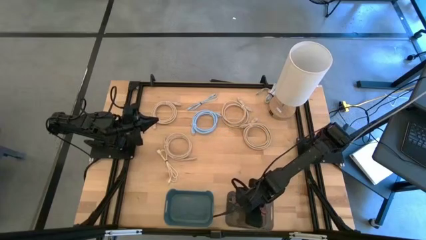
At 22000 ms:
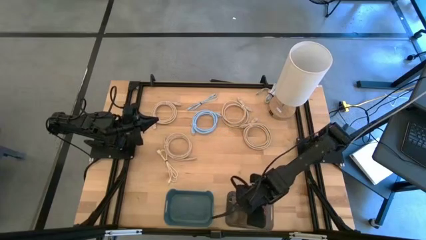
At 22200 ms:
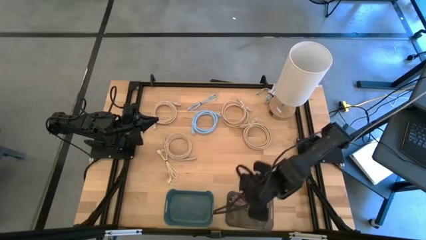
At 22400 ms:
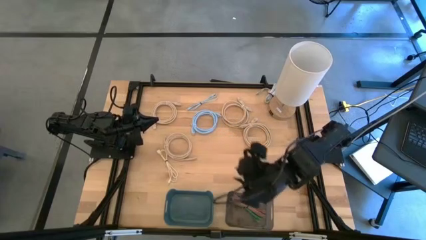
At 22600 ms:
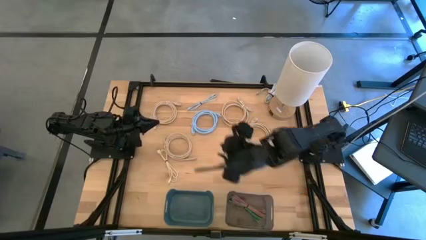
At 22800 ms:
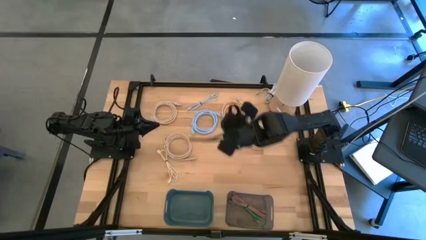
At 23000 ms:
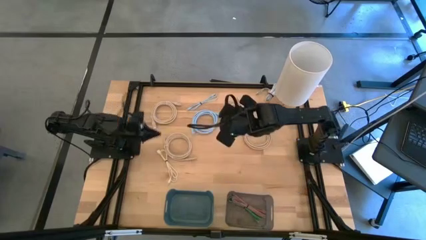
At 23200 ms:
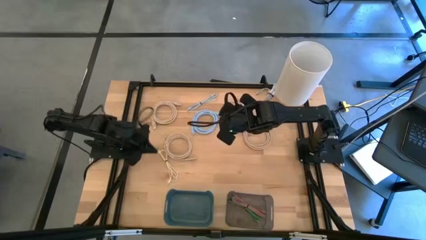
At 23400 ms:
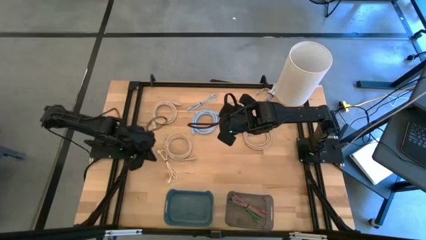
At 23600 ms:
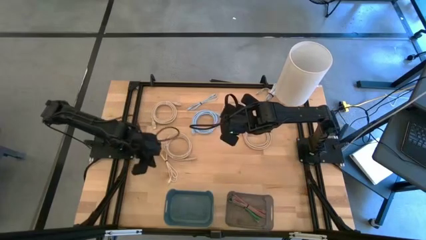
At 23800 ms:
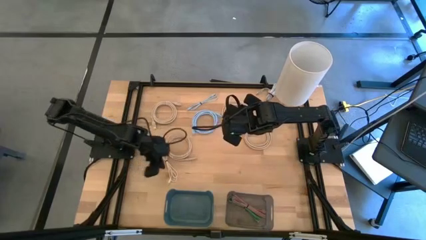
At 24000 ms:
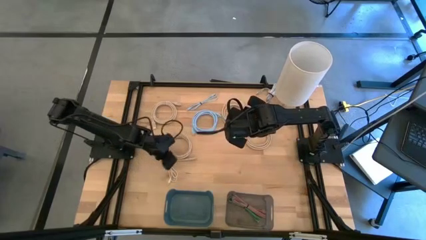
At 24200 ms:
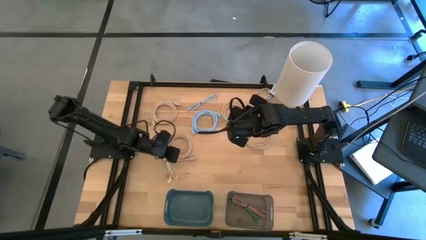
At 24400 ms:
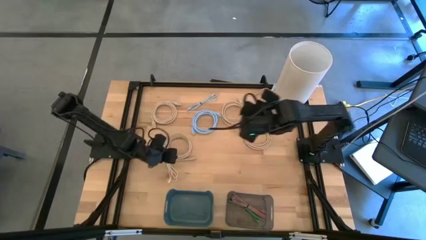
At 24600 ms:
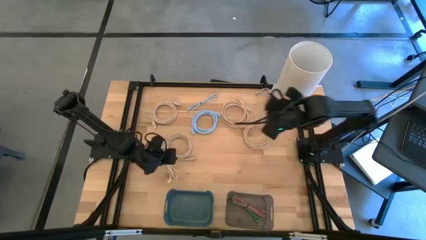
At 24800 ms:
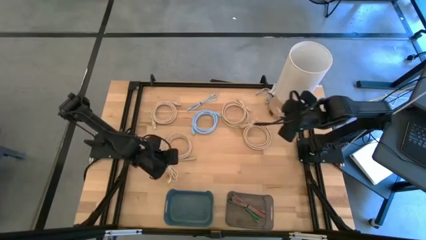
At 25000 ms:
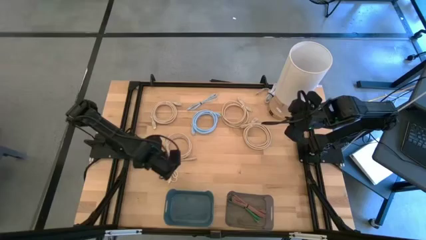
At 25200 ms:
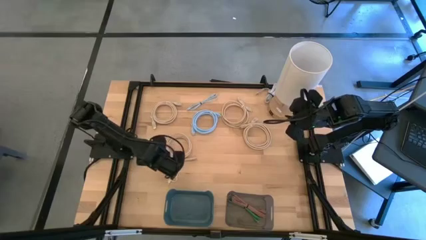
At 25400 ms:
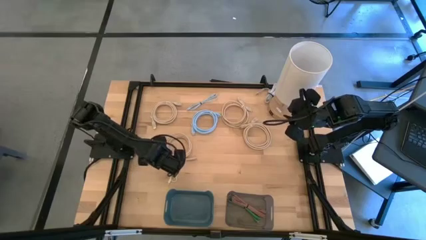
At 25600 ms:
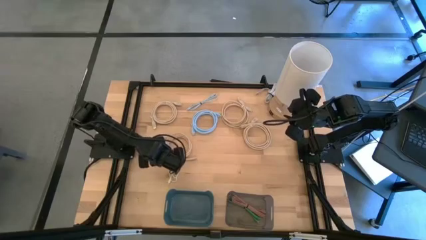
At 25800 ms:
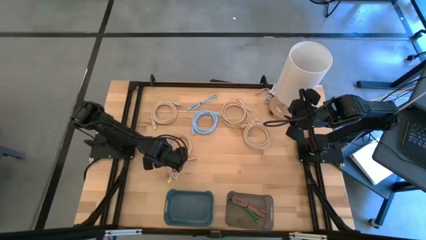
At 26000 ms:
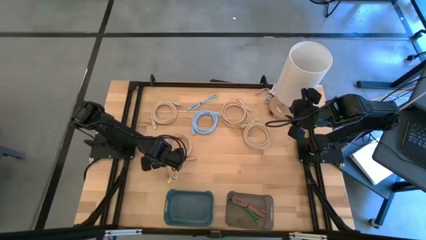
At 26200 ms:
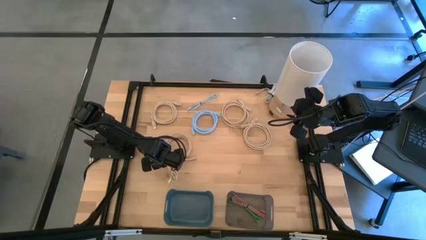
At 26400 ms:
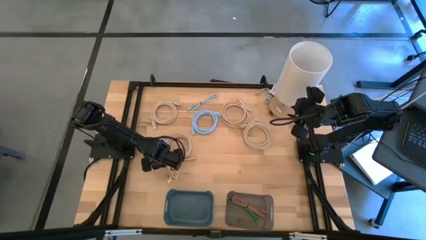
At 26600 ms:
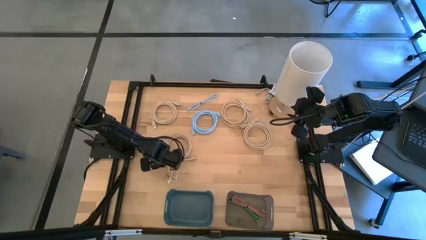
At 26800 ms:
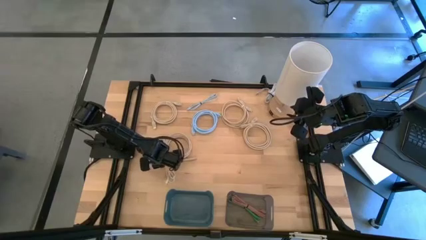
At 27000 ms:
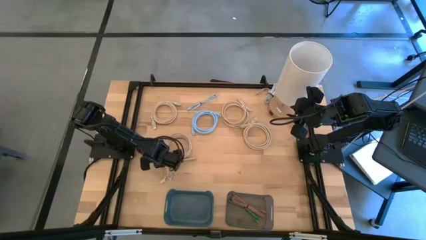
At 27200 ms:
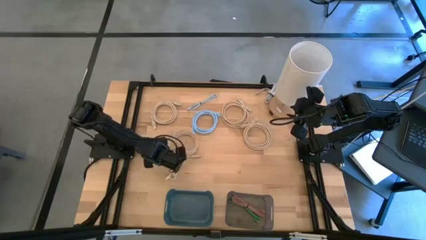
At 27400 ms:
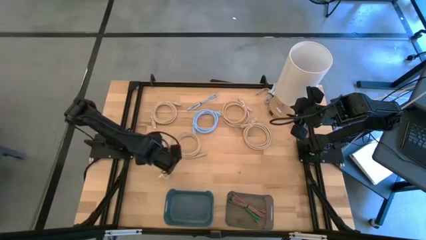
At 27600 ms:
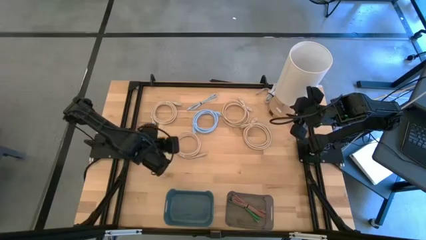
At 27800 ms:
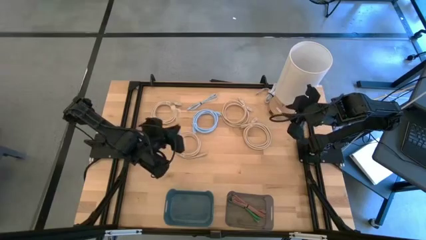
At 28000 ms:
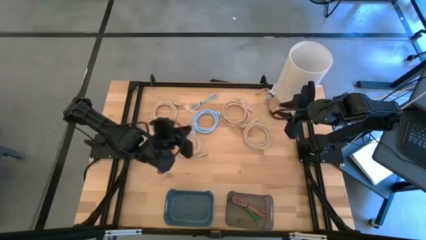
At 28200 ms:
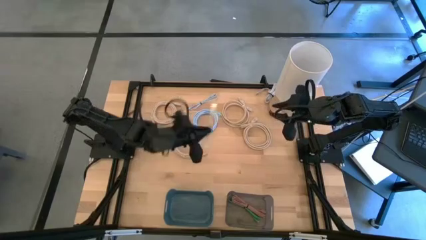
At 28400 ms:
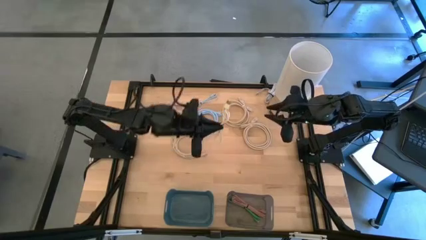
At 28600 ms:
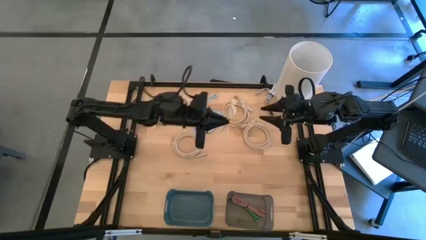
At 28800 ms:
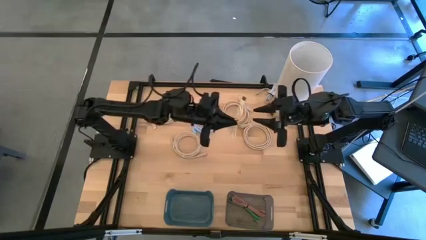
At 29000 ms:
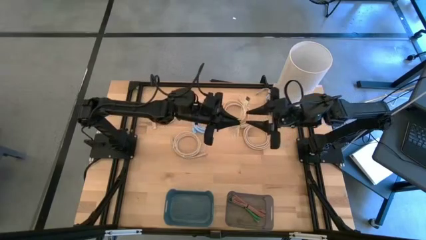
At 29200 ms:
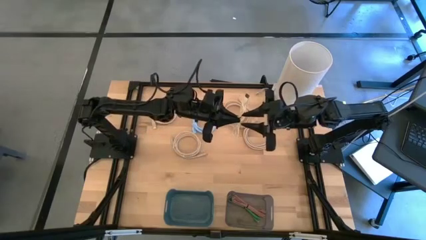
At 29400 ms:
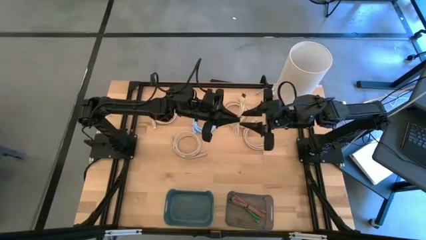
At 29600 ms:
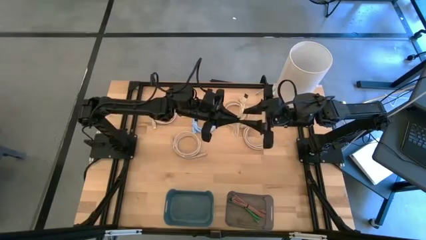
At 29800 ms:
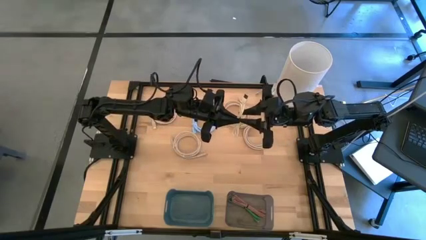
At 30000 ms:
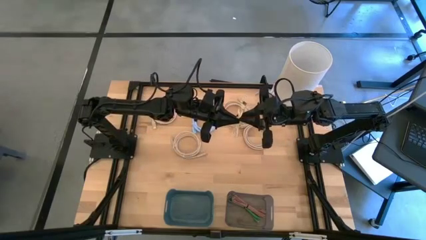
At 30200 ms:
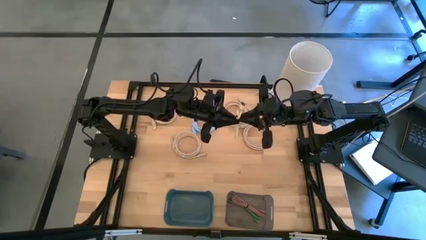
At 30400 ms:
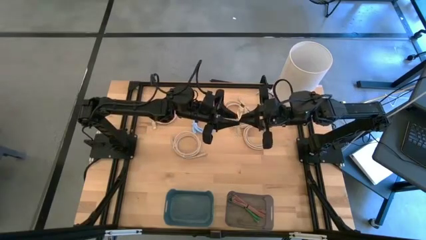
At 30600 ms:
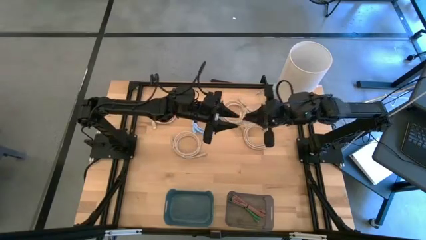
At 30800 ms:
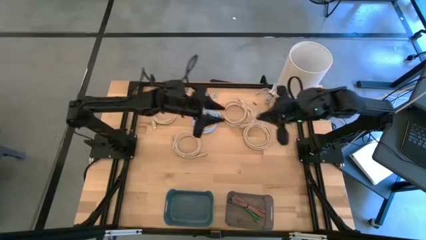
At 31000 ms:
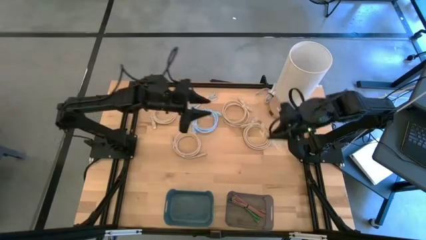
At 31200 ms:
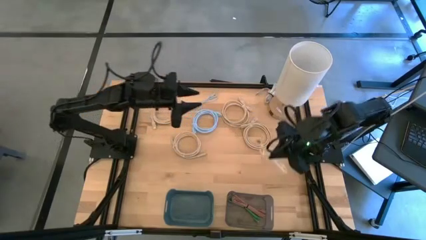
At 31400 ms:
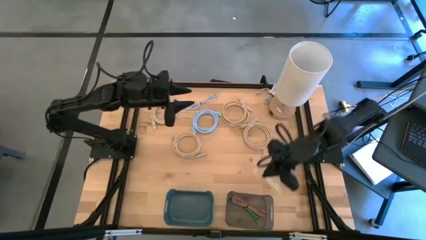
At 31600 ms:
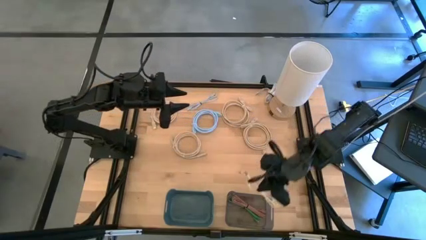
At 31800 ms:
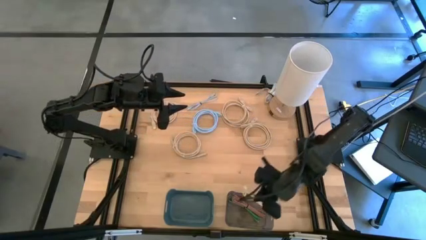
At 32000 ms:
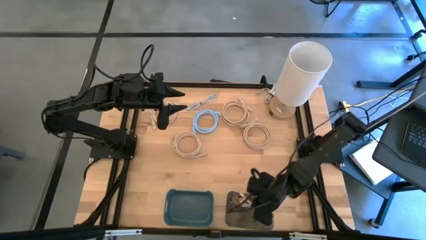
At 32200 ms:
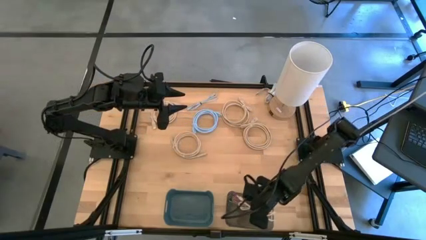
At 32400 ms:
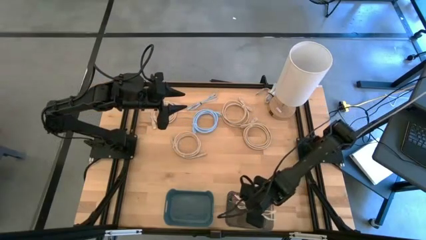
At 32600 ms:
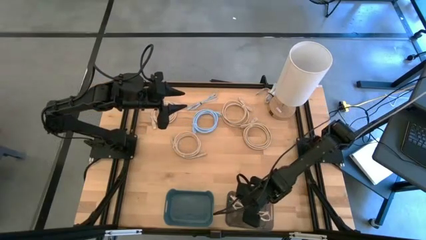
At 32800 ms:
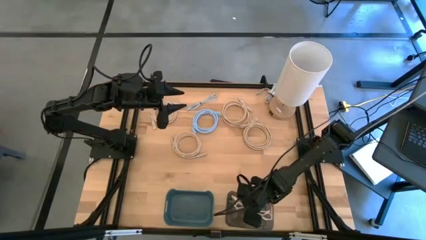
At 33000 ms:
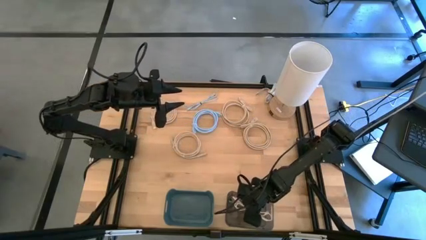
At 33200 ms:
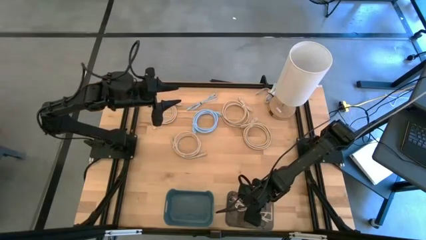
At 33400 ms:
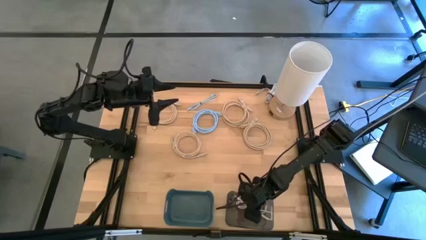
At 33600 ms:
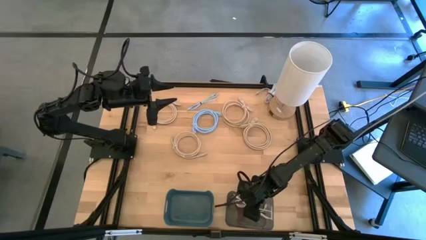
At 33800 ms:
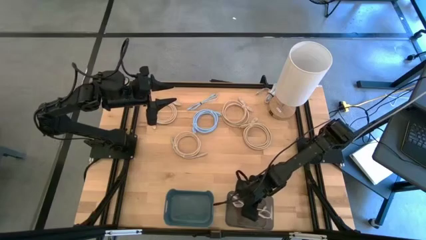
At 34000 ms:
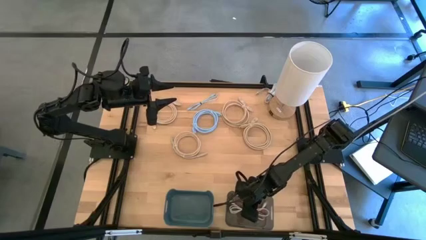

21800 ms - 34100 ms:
Put the white charger cable into the black bin
